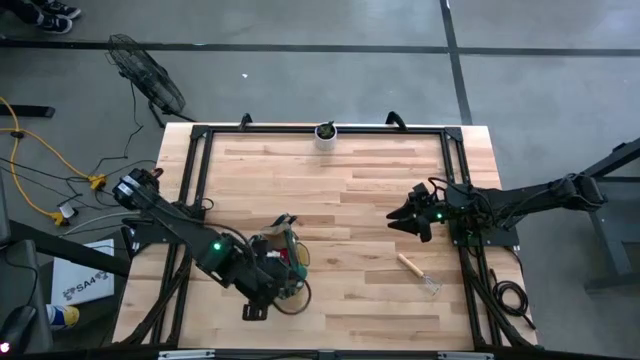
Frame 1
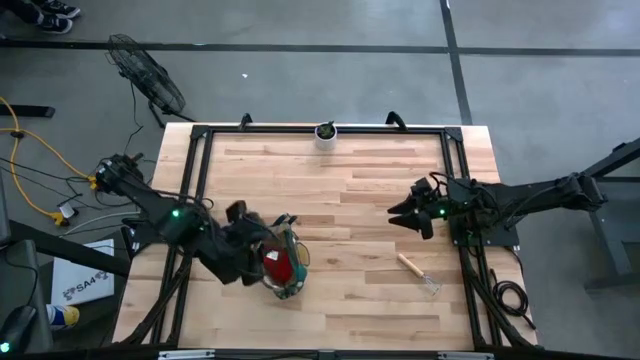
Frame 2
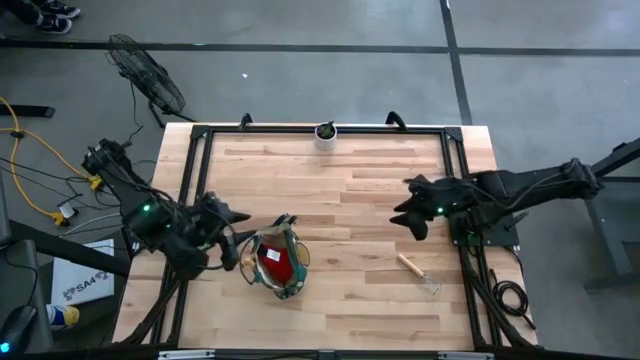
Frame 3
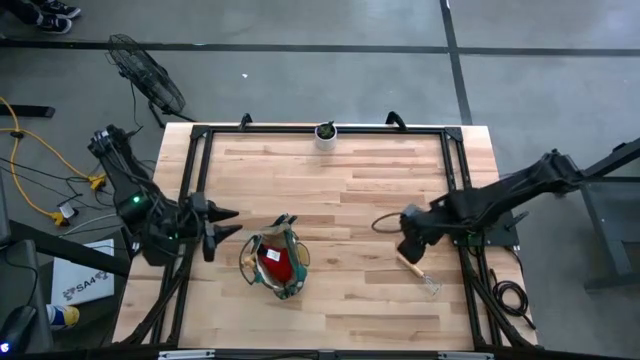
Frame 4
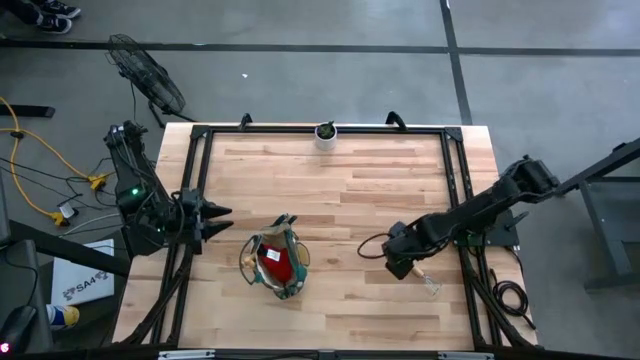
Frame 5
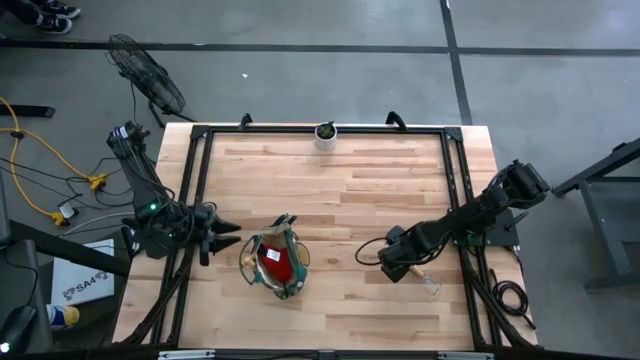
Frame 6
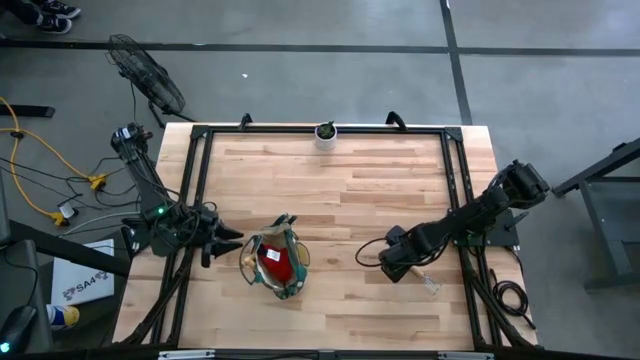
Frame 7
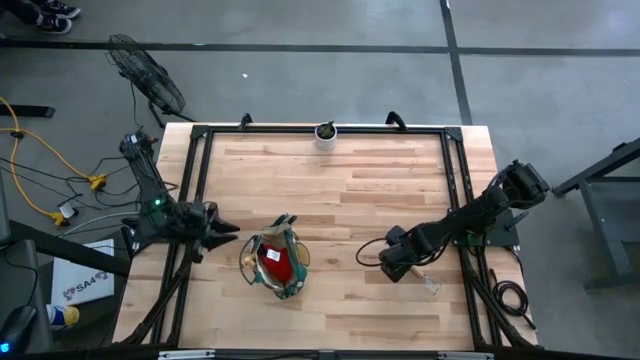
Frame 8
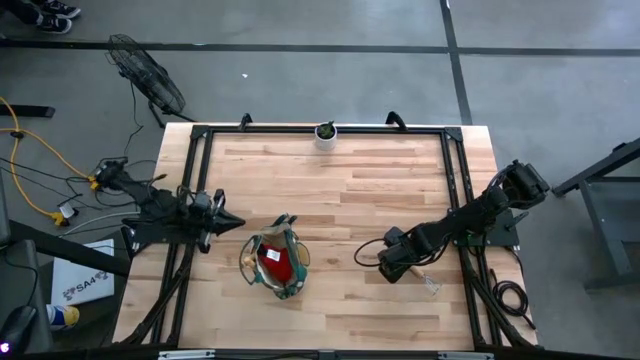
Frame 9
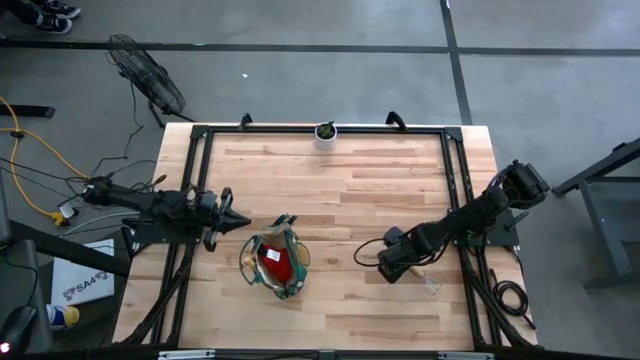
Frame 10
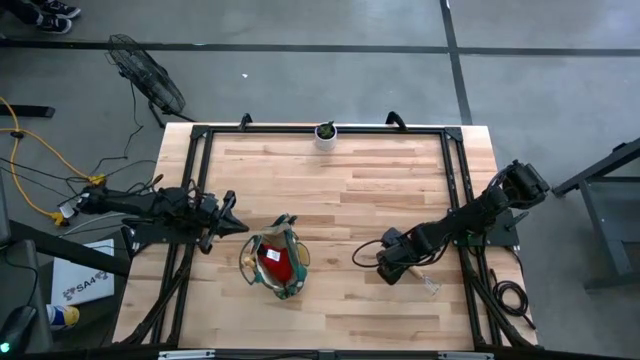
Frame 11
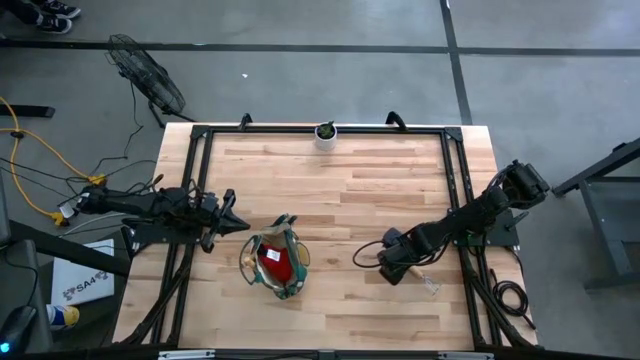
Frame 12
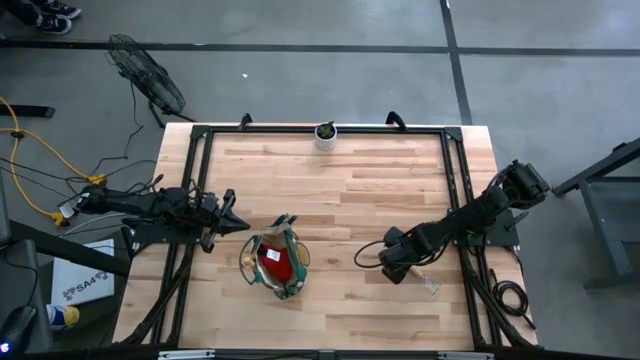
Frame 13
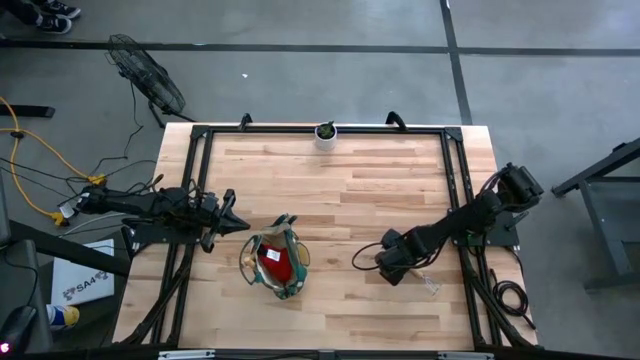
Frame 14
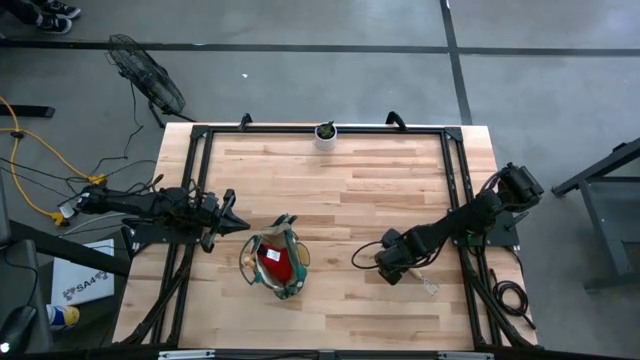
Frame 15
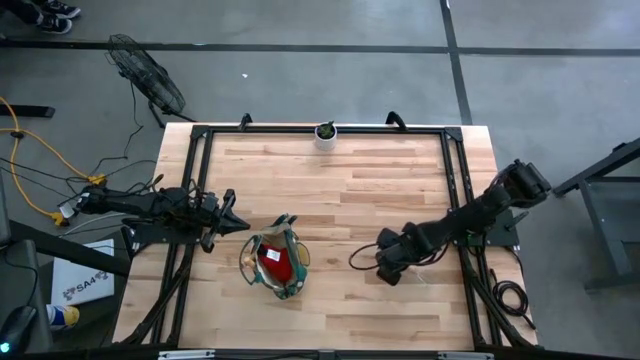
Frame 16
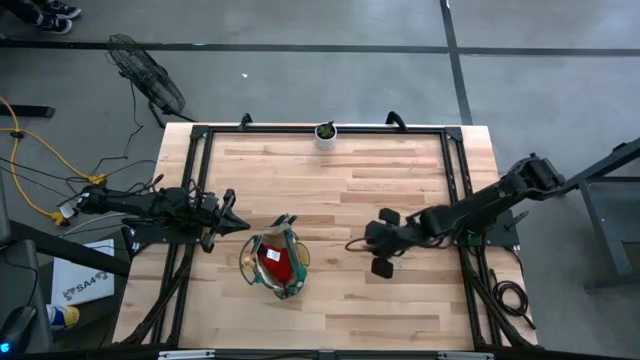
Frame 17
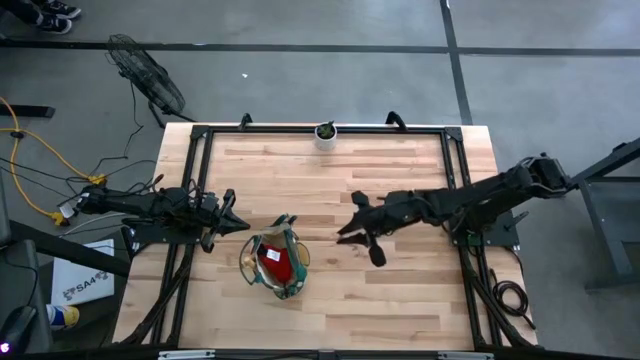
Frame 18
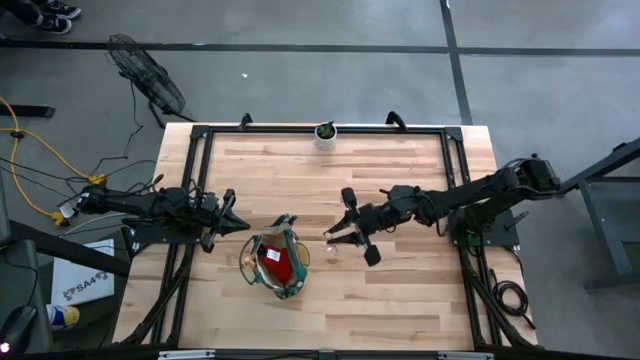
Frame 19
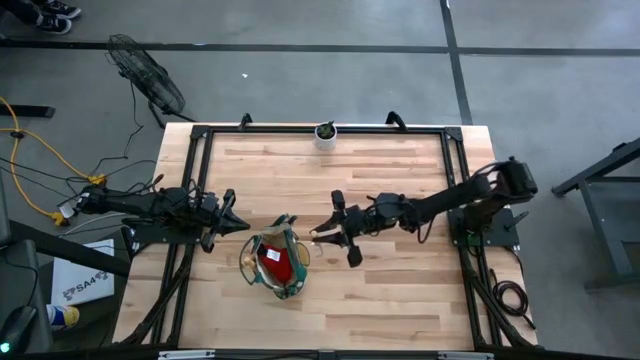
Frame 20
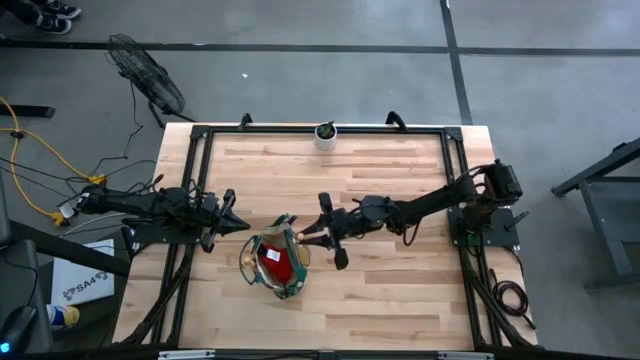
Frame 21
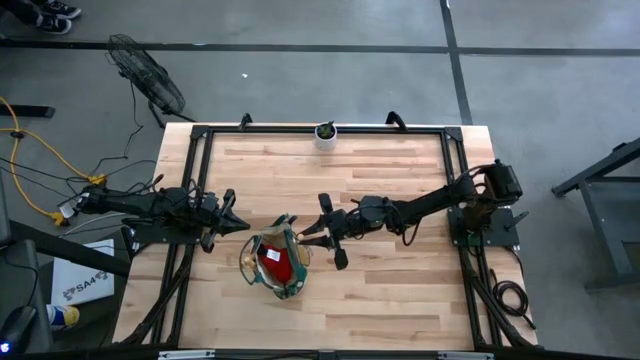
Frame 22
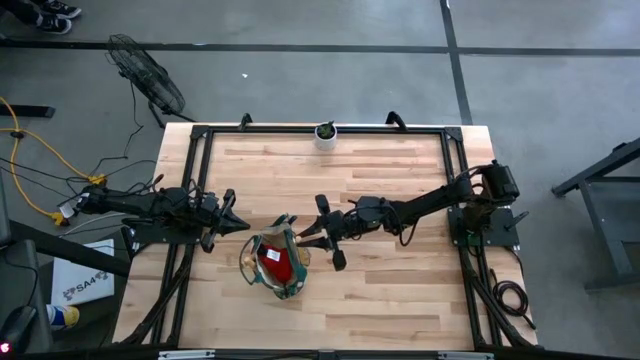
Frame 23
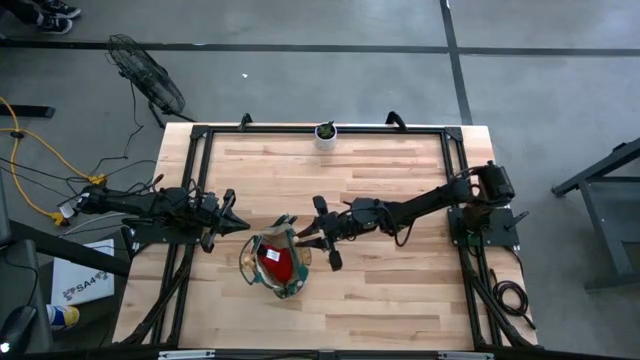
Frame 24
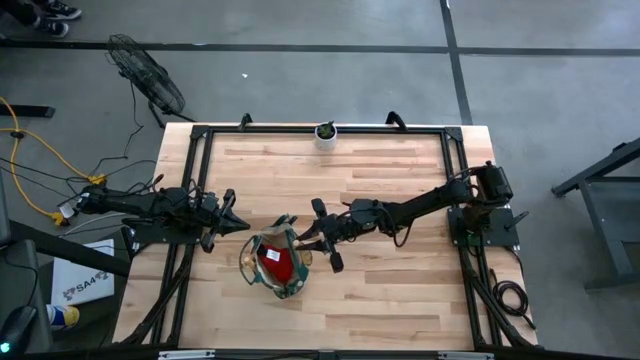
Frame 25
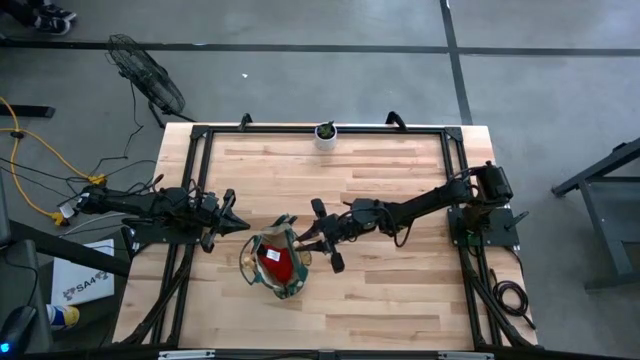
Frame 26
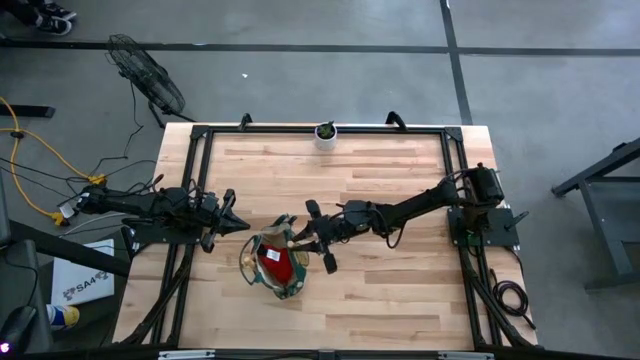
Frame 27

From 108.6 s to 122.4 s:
Task: Pick & Place Garden tools in Gardening bag
Put the brown hand rake into the gardening bag

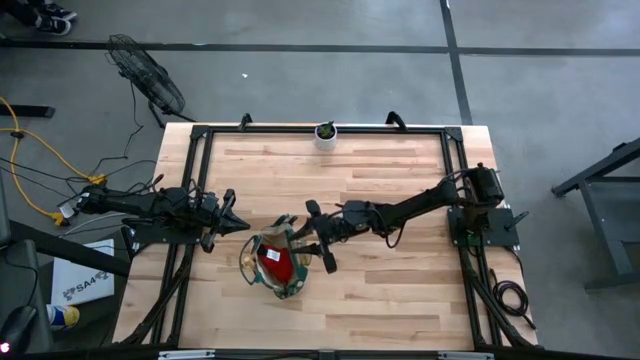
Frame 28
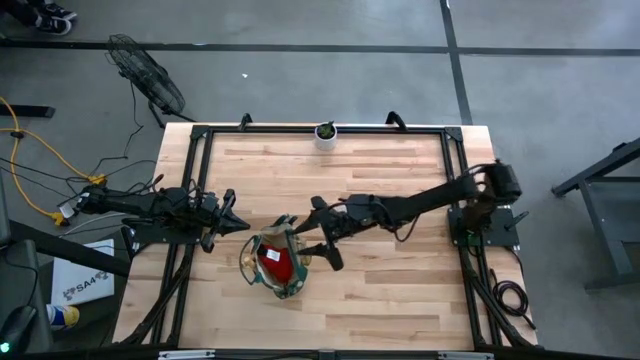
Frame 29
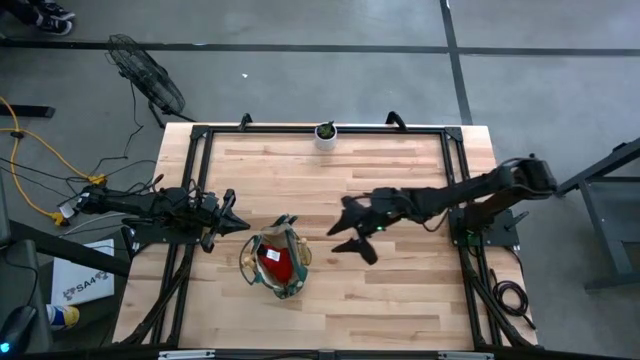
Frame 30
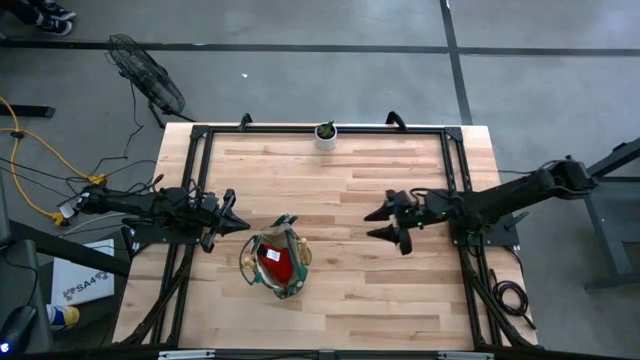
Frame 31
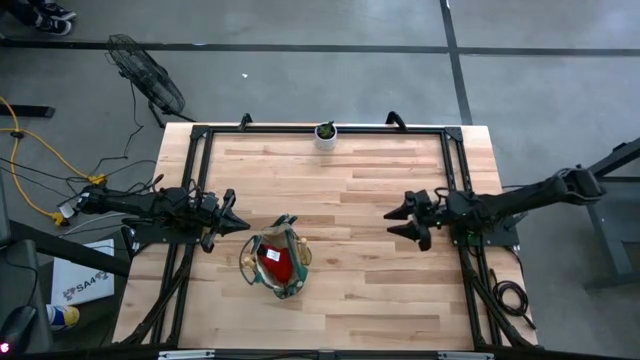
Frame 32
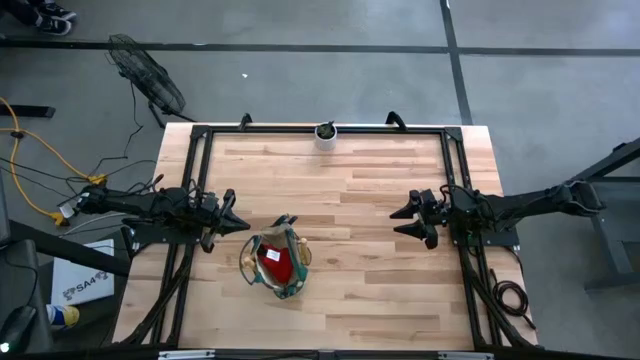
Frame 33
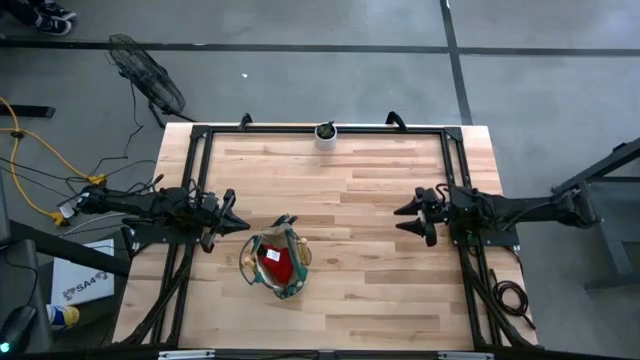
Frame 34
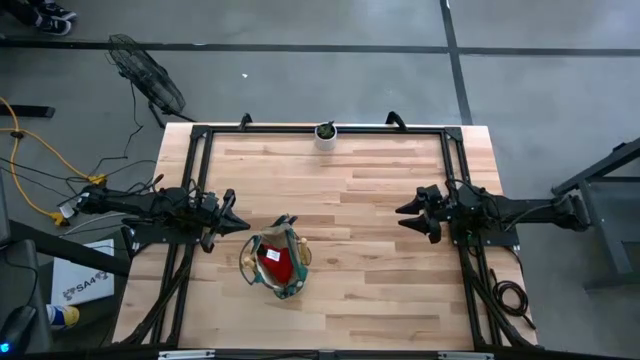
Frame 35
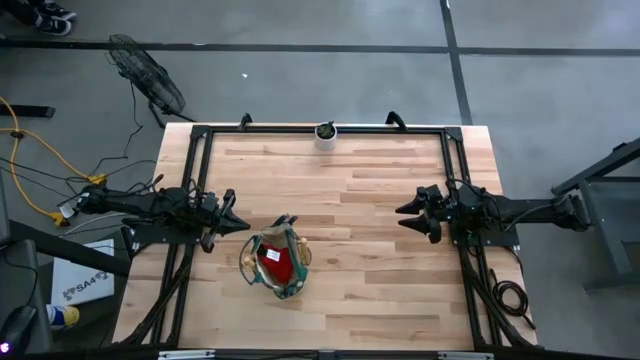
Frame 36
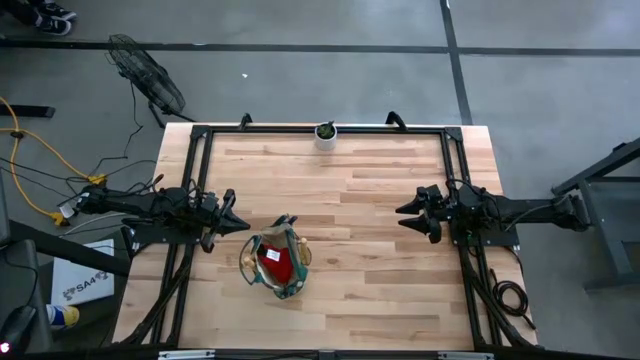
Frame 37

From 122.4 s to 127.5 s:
Return to Home Position
